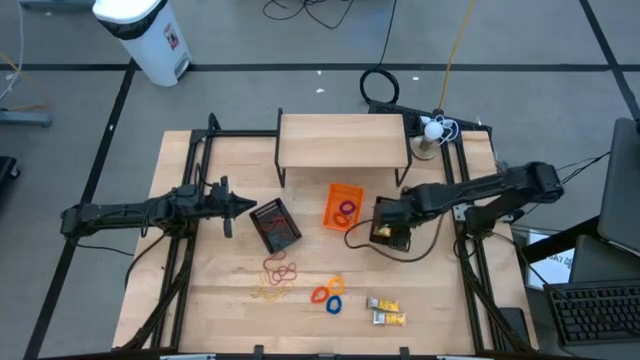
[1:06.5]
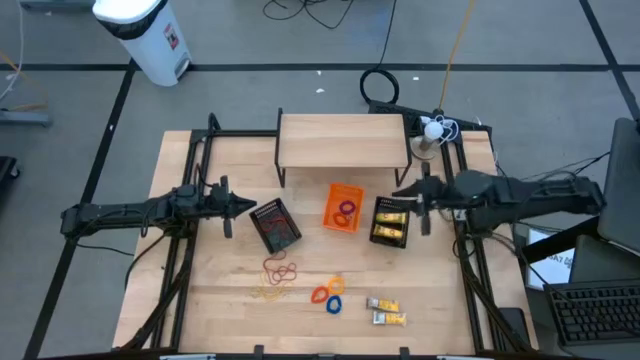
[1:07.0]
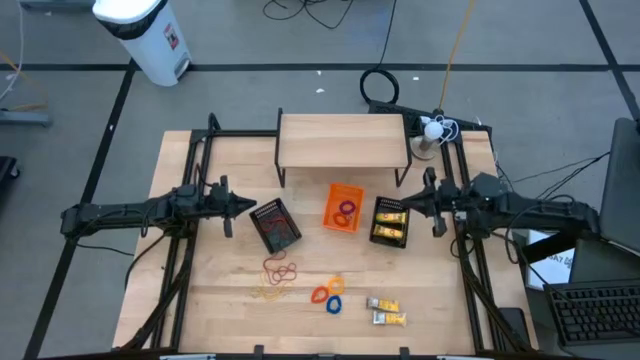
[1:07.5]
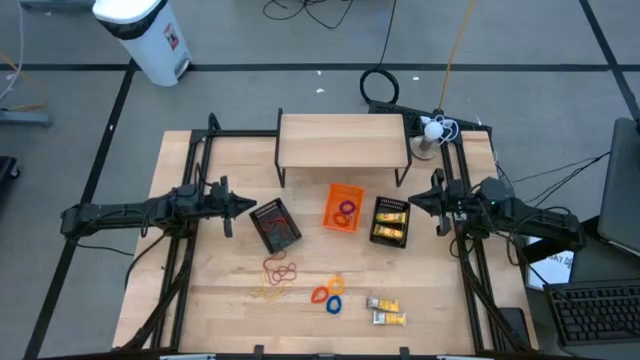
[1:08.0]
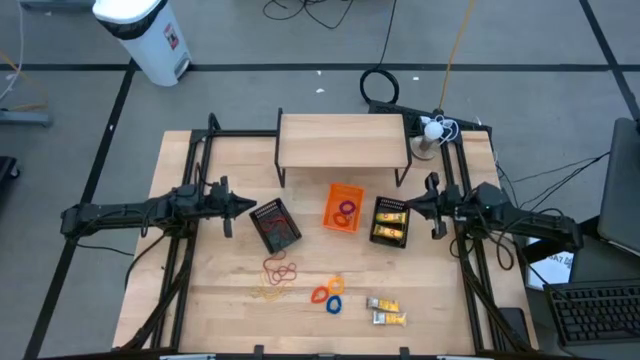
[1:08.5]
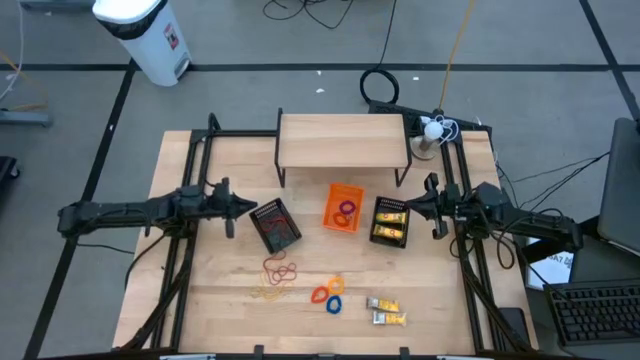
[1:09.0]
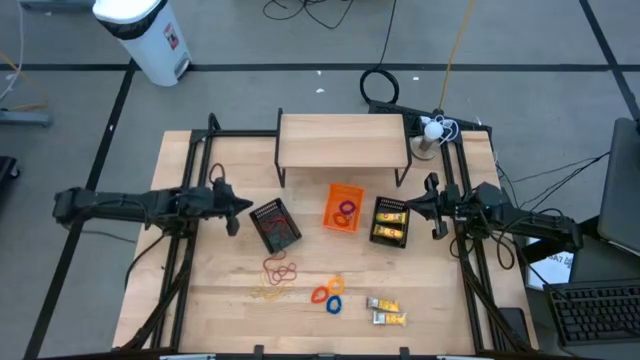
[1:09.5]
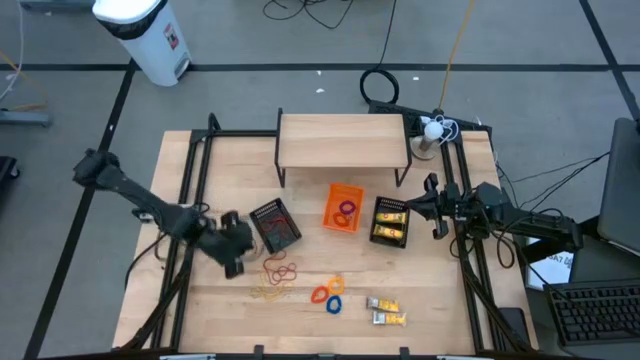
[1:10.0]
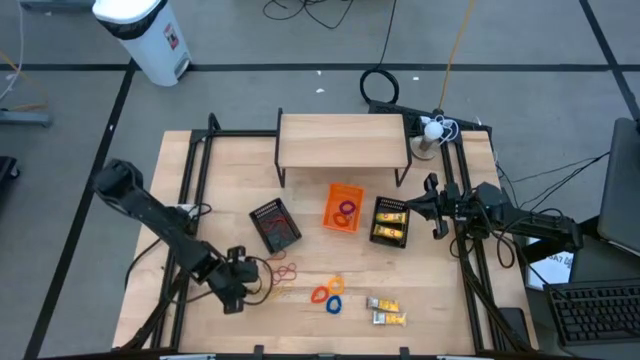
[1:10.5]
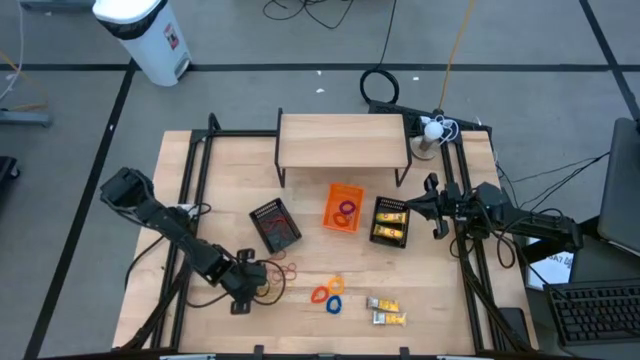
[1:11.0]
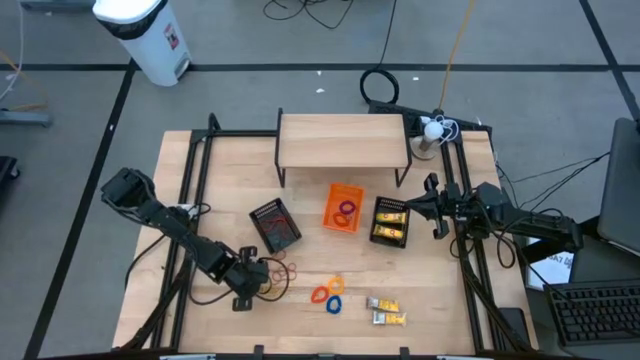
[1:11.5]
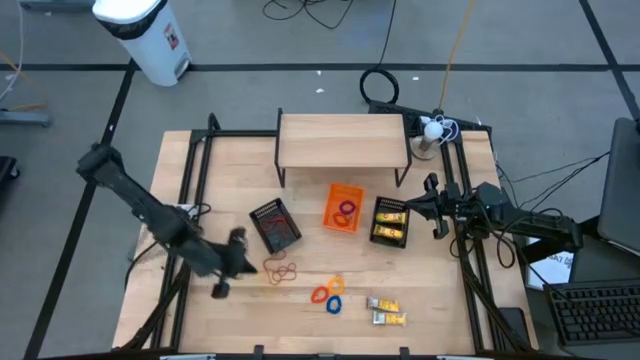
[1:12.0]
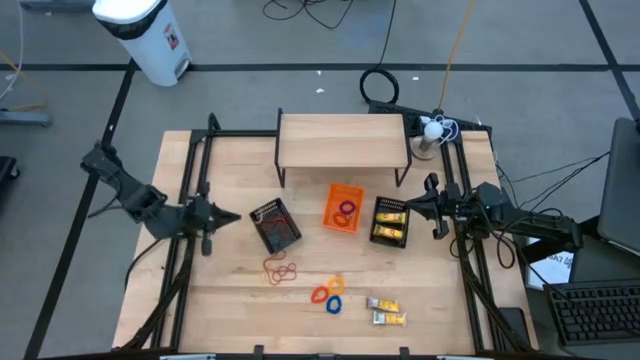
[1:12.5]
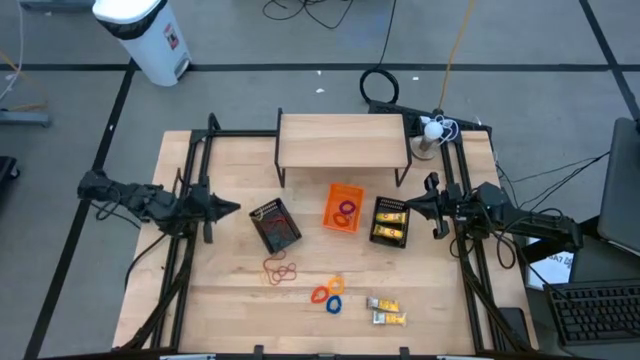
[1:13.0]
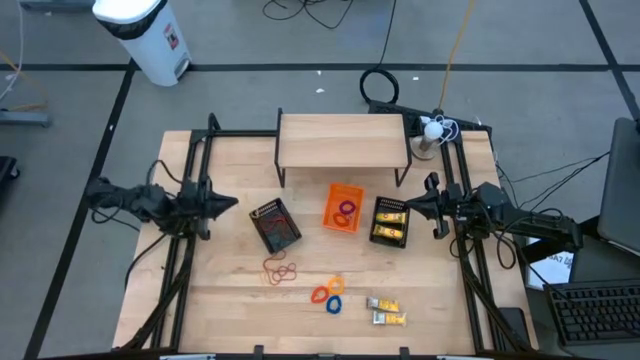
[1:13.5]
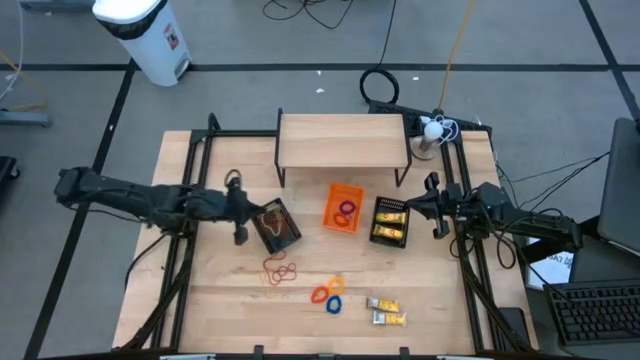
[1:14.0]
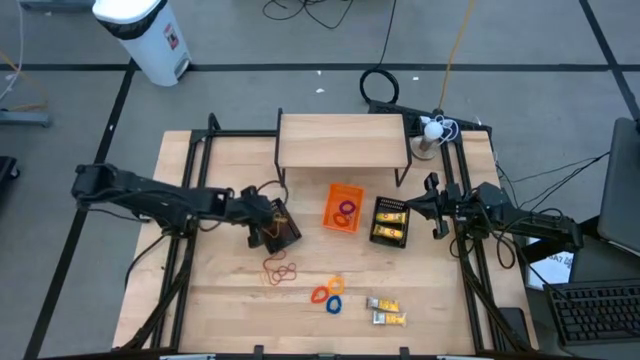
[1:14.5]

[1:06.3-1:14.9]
Task: Pick & Place Office Desk Supplies
Put the yellow rubber band into the left black bin

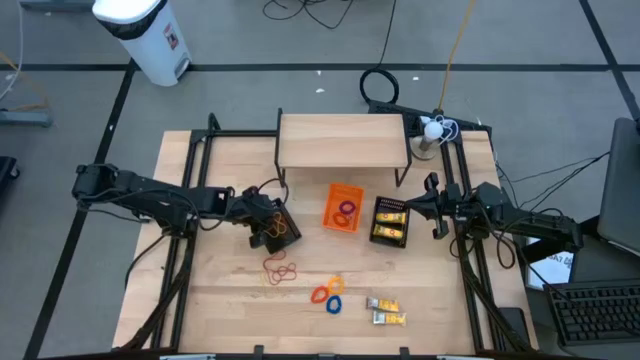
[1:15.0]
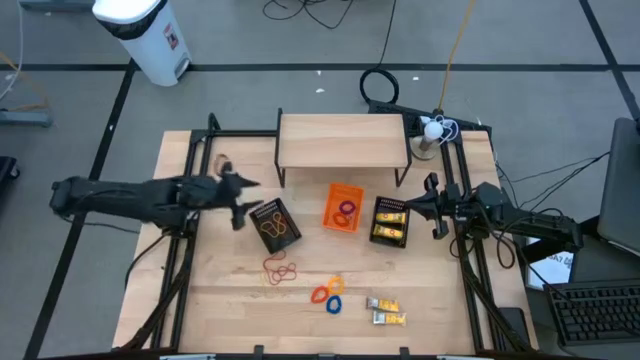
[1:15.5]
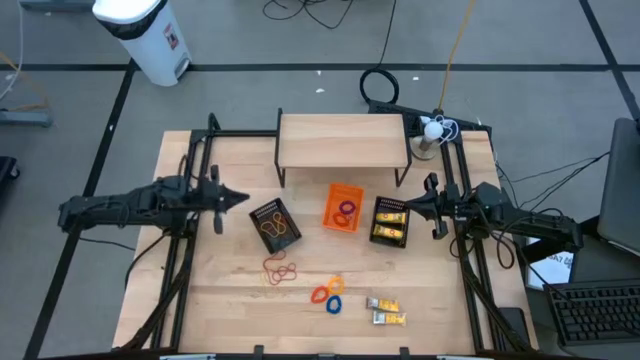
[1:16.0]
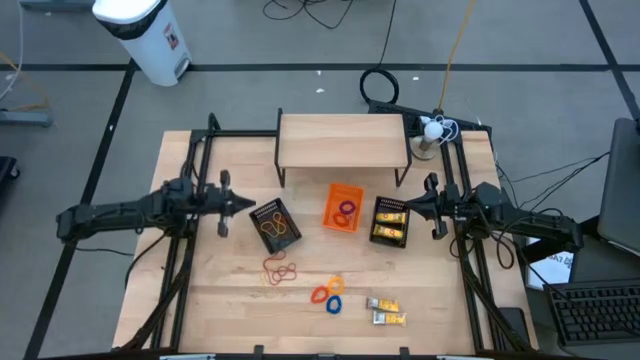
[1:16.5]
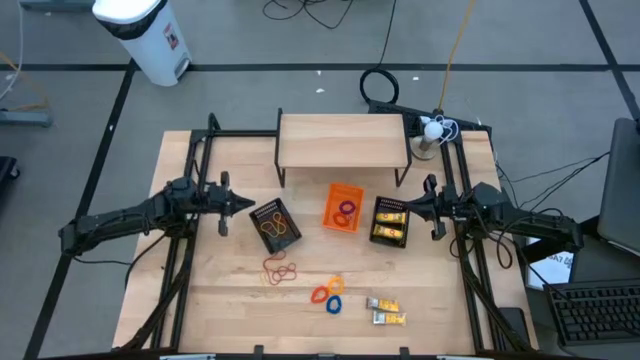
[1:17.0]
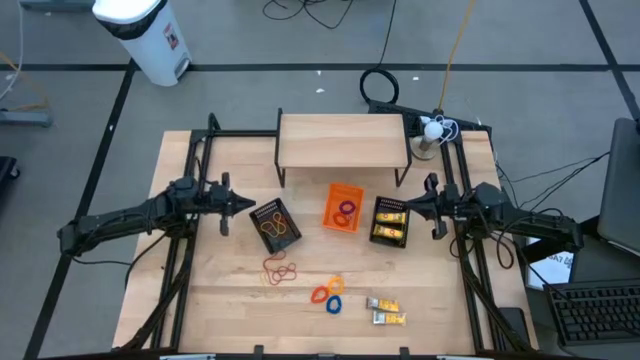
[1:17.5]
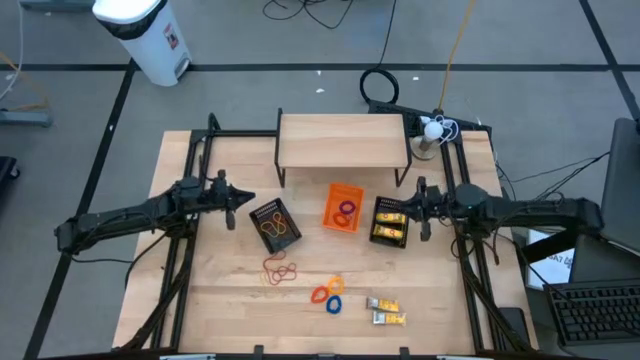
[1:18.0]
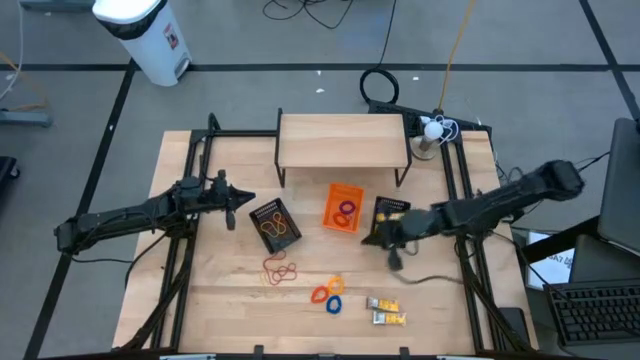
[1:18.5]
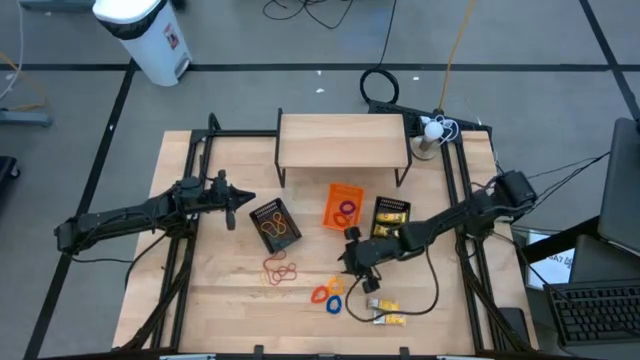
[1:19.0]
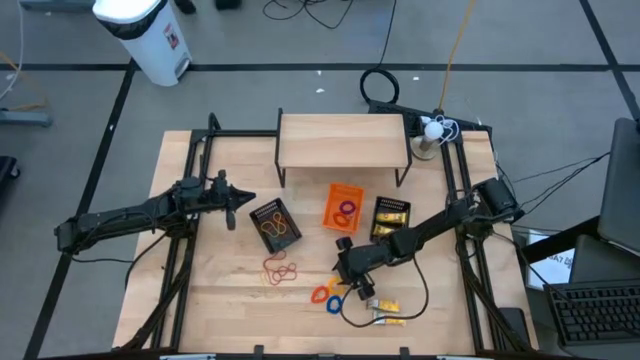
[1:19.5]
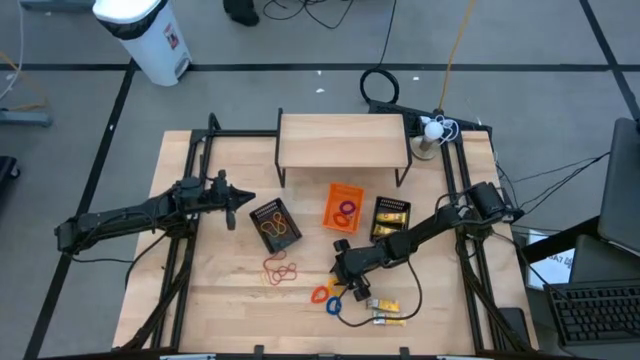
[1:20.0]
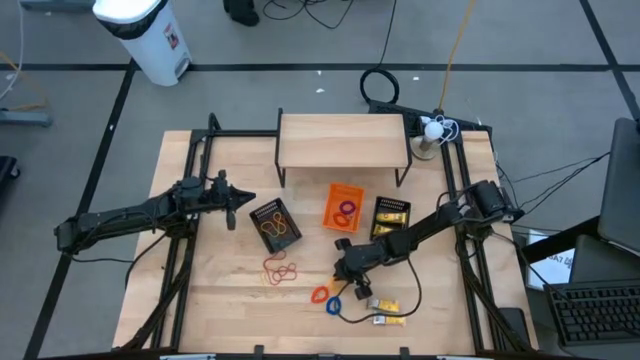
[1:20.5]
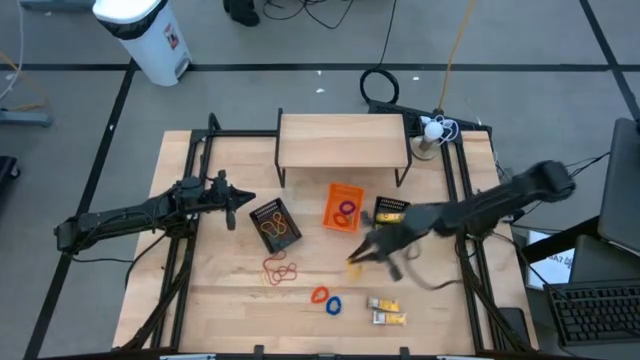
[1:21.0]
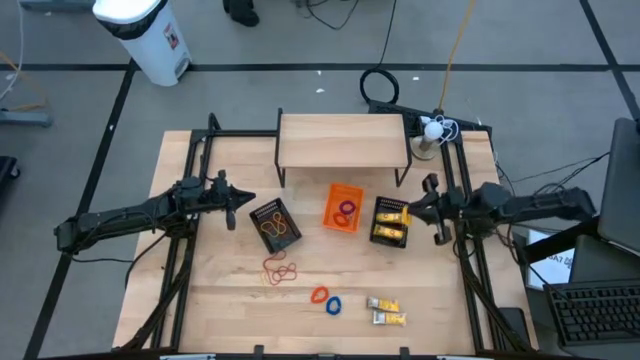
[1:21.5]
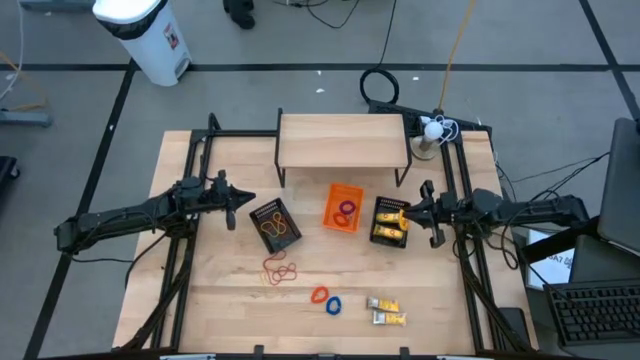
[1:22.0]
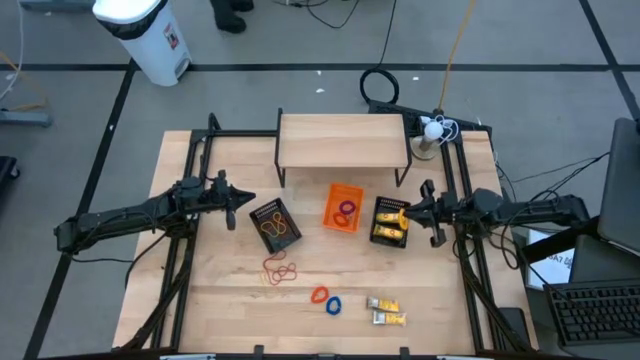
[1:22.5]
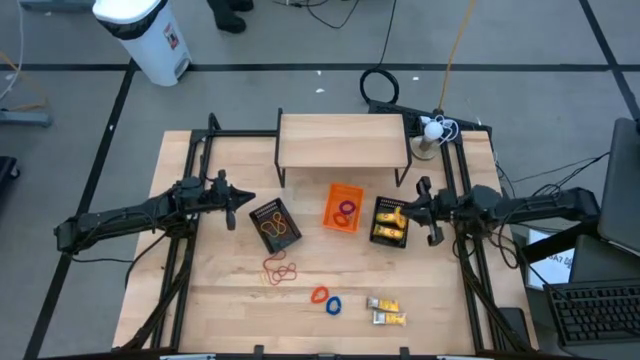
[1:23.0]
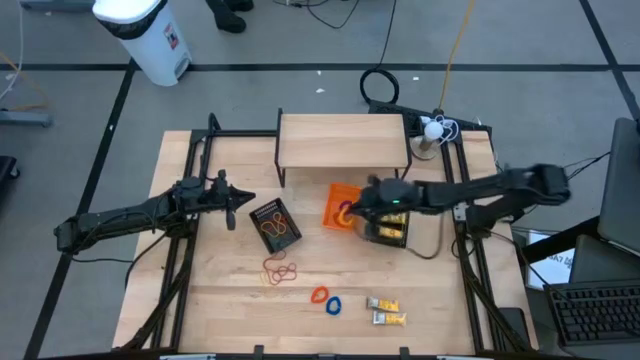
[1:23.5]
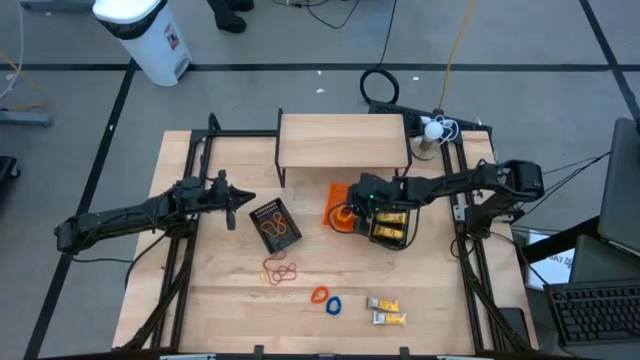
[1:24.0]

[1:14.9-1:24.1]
Put the yellow spring keychain into the orange bin
